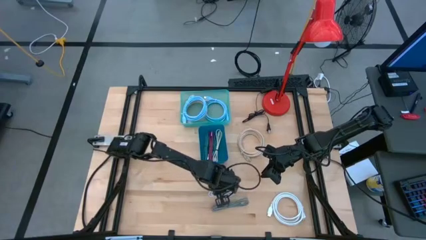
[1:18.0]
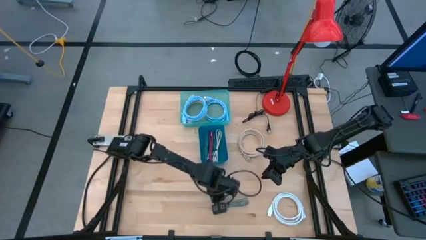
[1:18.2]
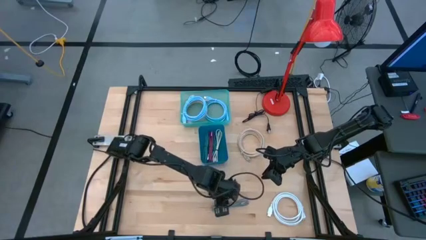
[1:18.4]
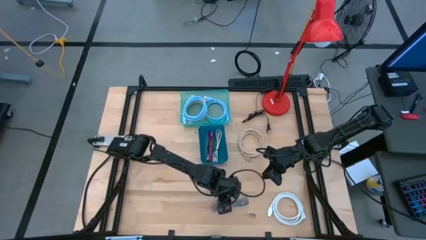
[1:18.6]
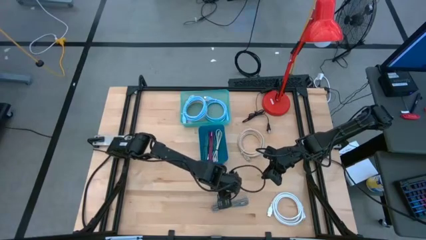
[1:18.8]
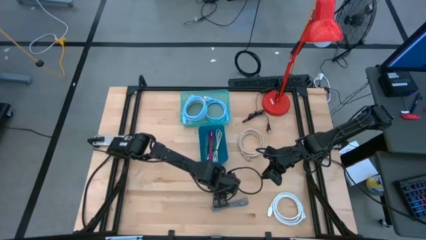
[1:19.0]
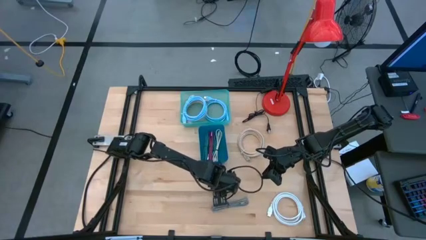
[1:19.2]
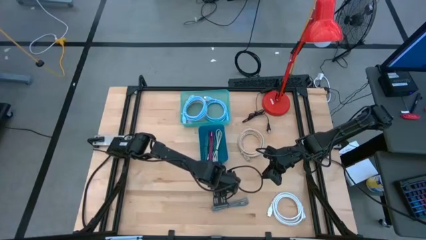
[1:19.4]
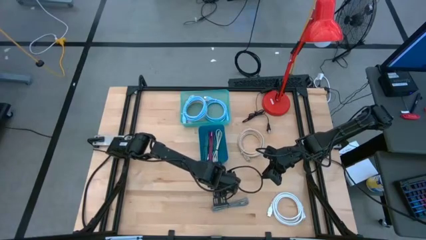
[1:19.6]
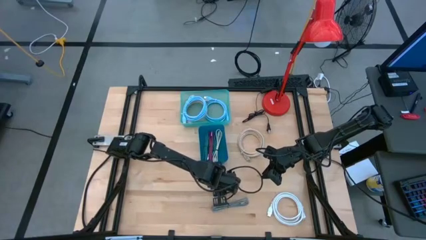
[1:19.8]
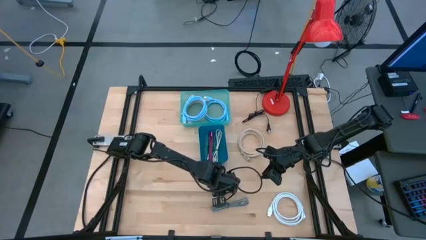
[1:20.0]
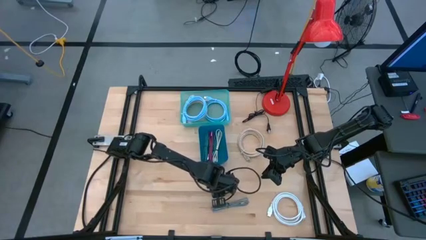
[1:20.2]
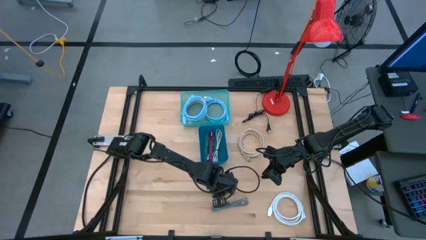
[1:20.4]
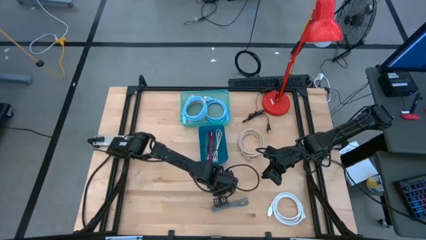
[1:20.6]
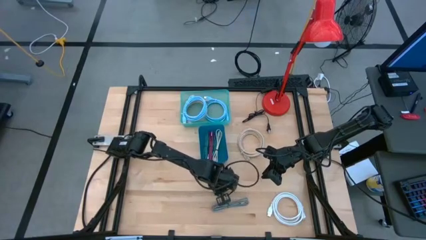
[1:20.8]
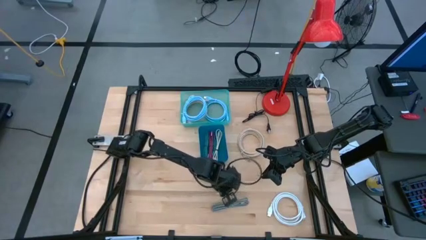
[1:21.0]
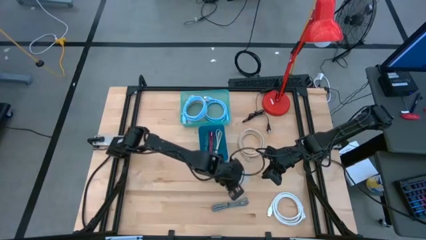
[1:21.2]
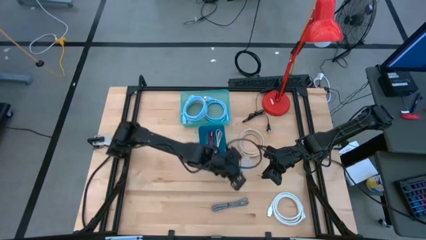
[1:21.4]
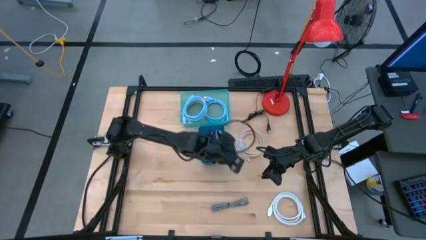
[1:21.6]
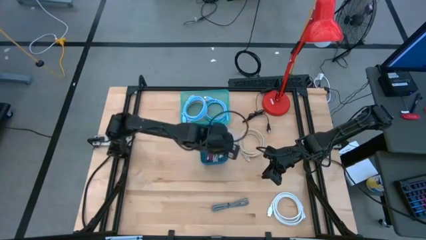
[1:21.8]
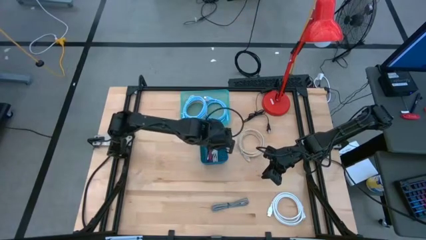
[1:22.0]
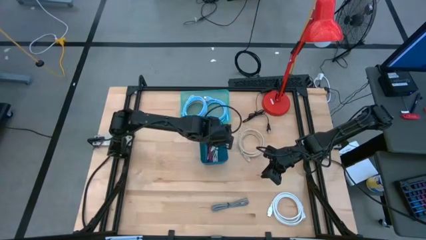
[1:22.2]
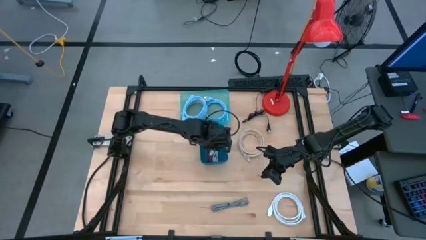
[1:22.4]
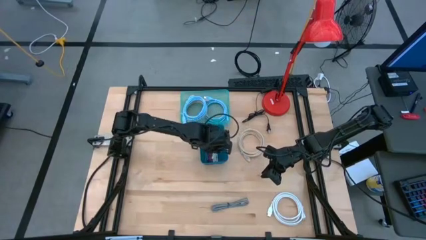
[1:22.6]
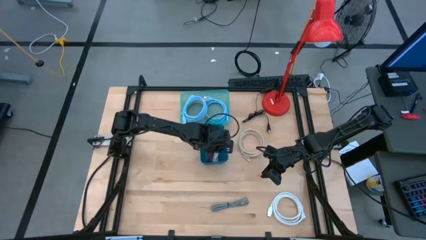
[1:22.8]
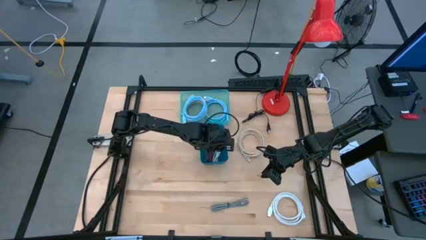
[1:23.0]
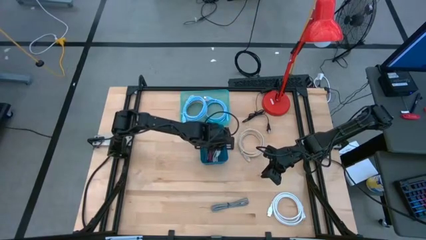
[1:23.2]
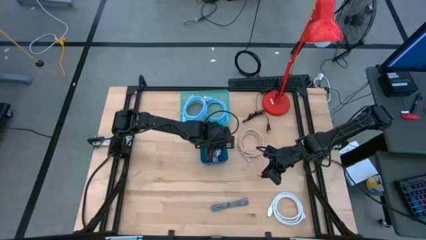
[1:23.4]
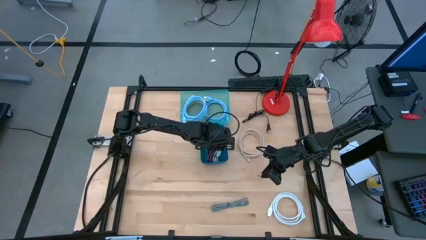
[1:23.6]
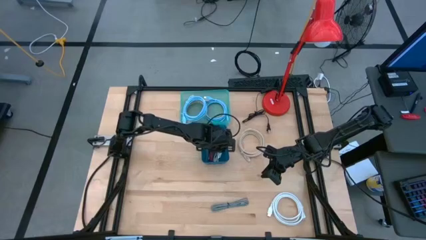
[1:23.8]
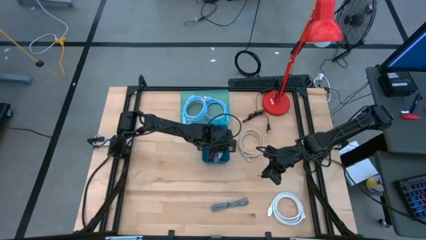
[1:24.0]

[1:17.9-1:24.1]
Task: Pick & Place USB Port
Put the white usb cable into the blue bin

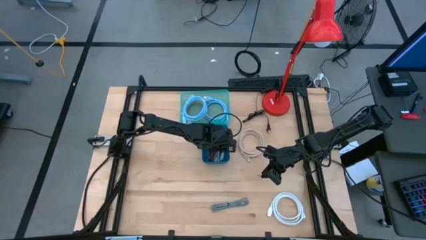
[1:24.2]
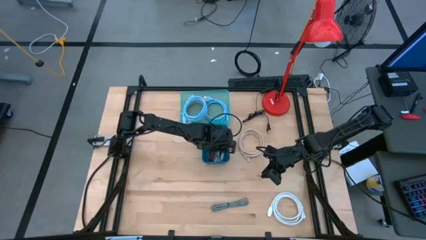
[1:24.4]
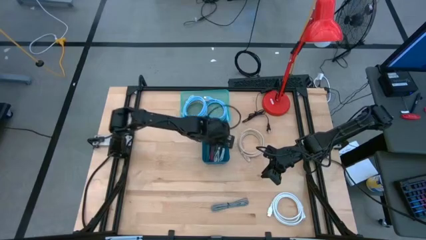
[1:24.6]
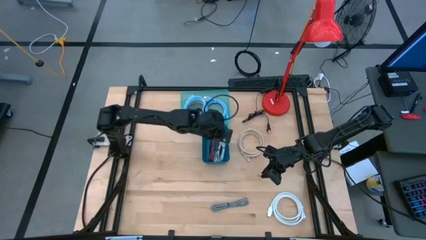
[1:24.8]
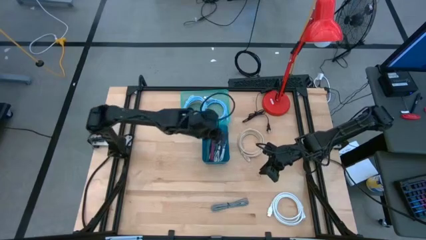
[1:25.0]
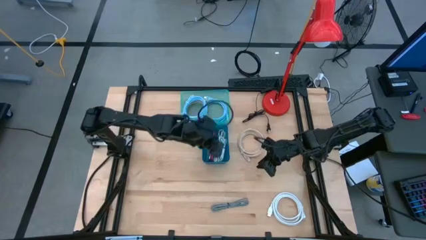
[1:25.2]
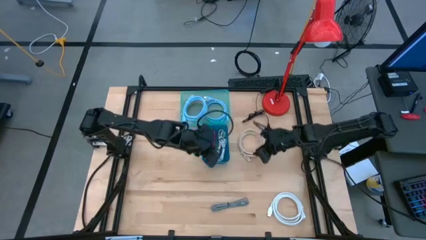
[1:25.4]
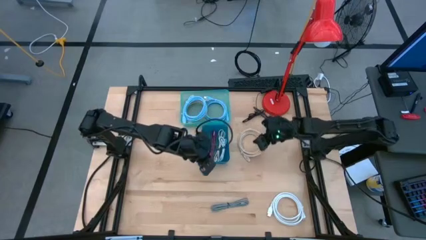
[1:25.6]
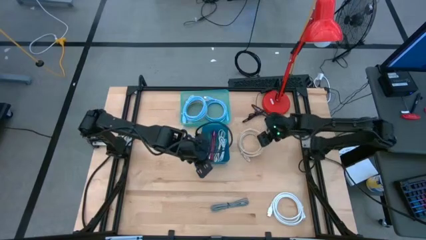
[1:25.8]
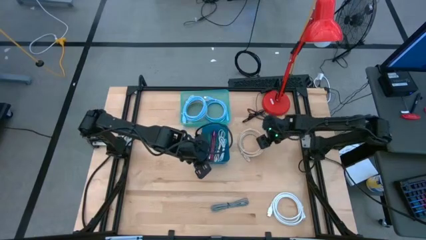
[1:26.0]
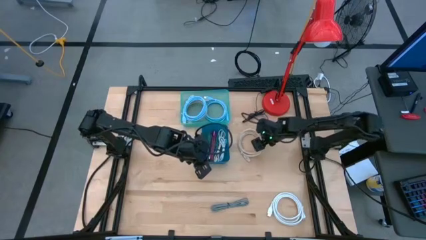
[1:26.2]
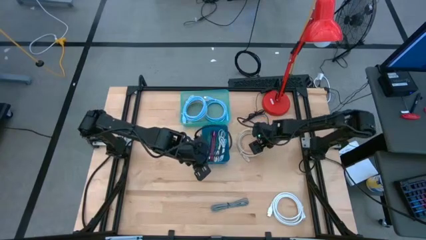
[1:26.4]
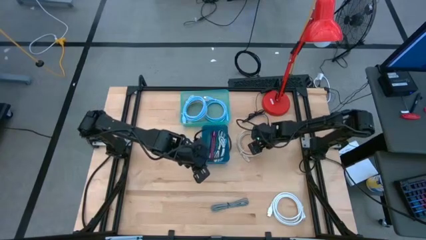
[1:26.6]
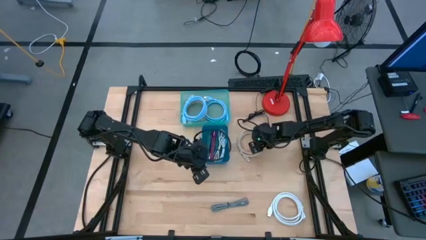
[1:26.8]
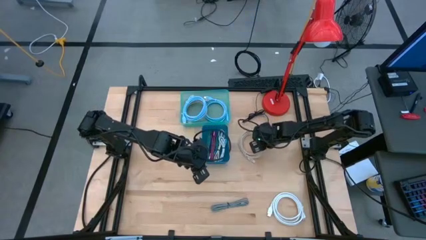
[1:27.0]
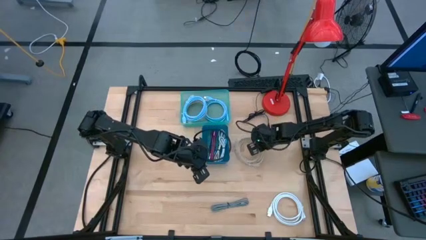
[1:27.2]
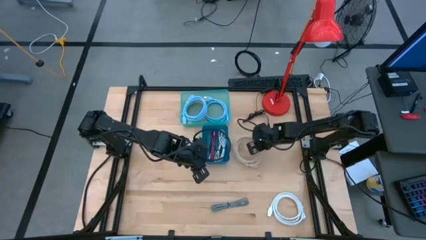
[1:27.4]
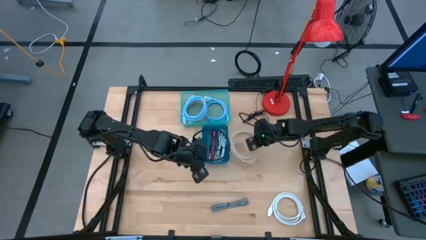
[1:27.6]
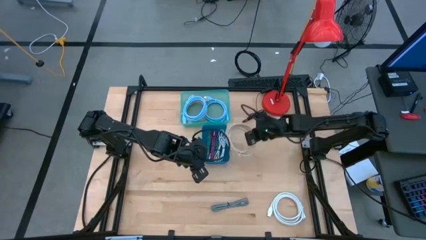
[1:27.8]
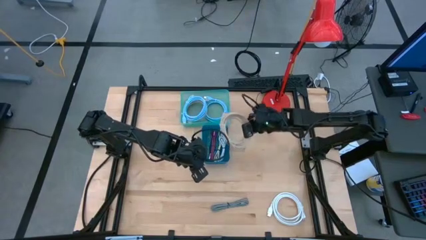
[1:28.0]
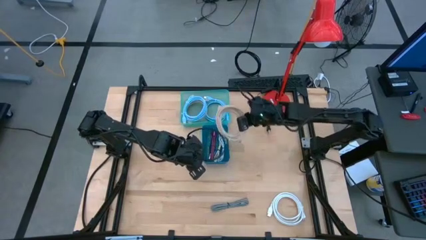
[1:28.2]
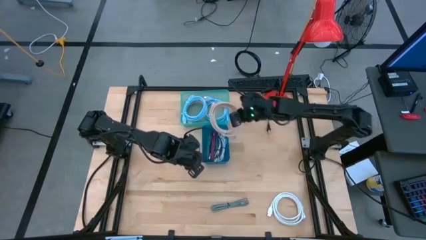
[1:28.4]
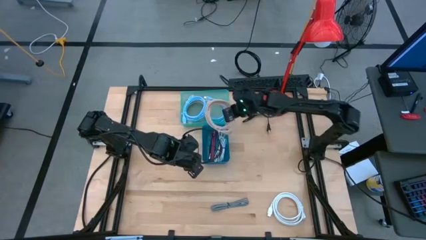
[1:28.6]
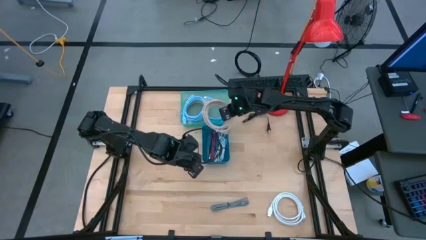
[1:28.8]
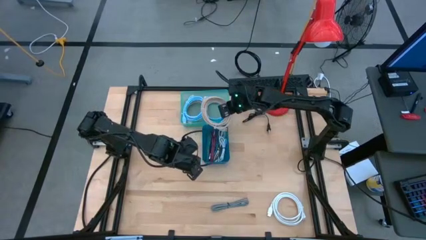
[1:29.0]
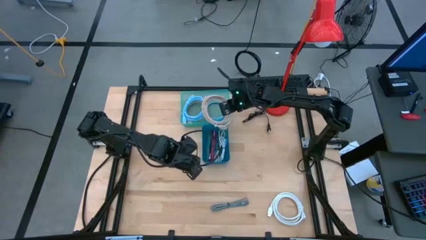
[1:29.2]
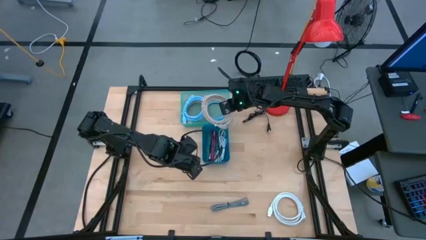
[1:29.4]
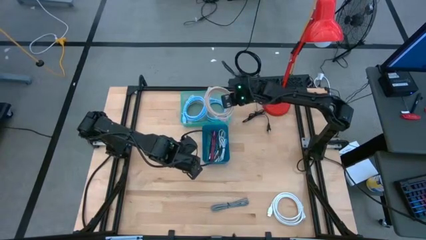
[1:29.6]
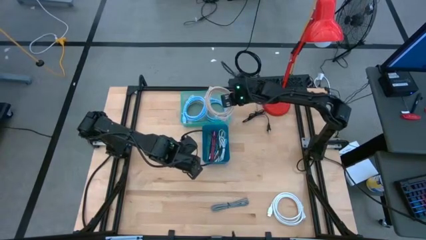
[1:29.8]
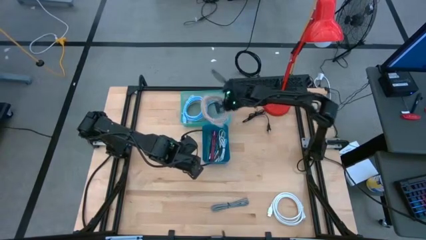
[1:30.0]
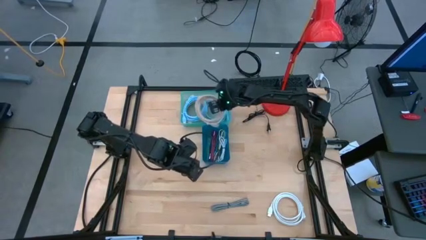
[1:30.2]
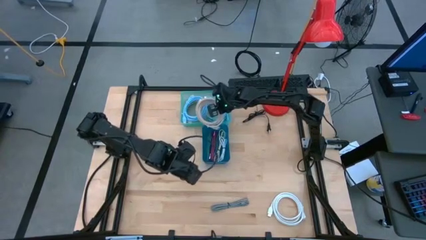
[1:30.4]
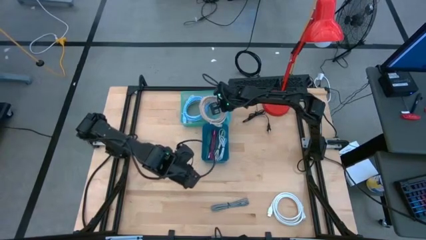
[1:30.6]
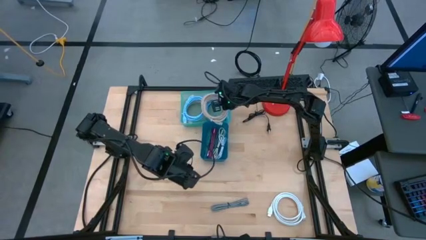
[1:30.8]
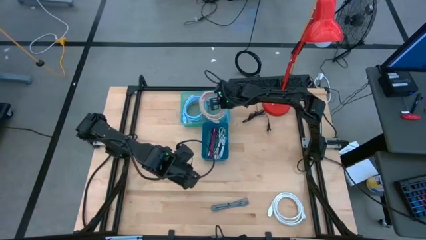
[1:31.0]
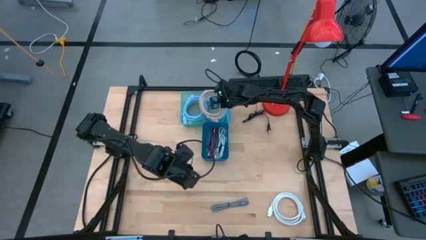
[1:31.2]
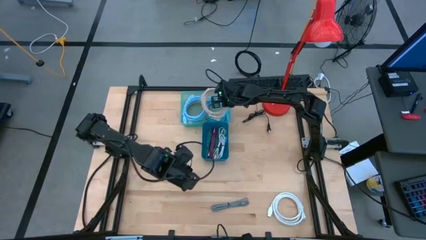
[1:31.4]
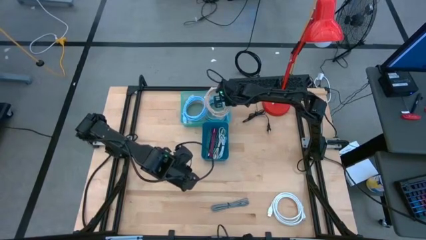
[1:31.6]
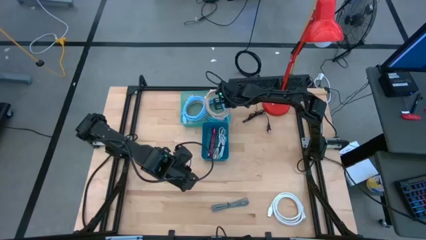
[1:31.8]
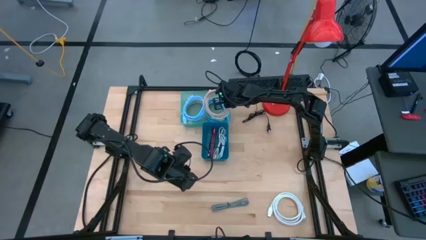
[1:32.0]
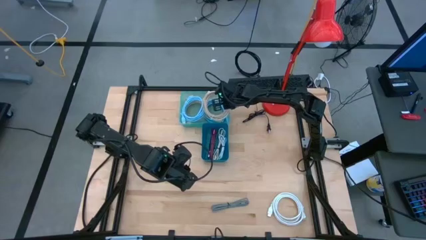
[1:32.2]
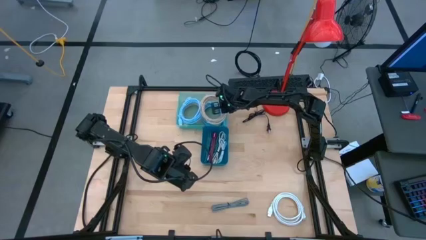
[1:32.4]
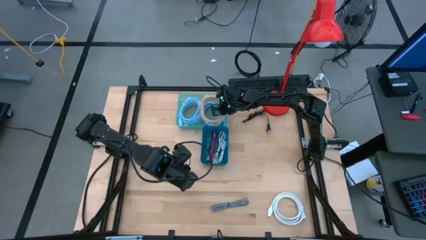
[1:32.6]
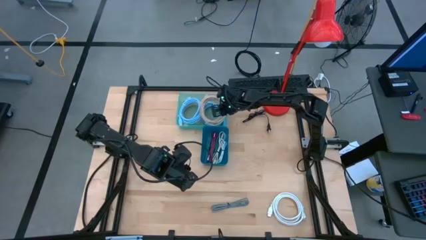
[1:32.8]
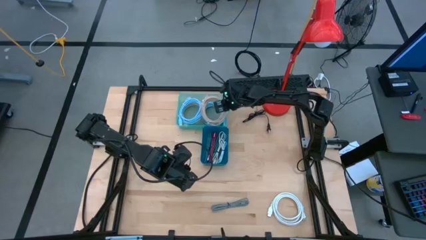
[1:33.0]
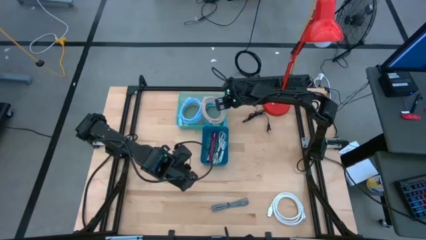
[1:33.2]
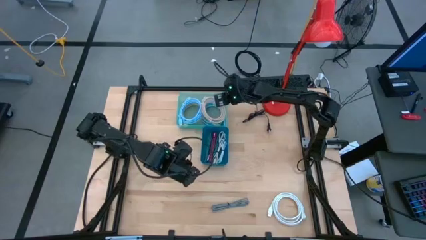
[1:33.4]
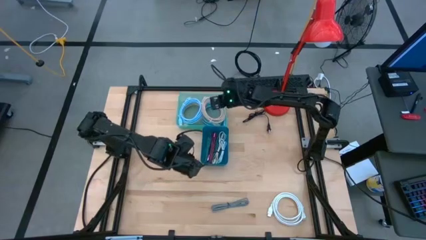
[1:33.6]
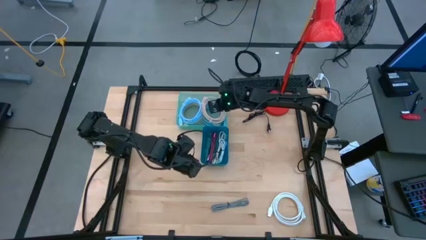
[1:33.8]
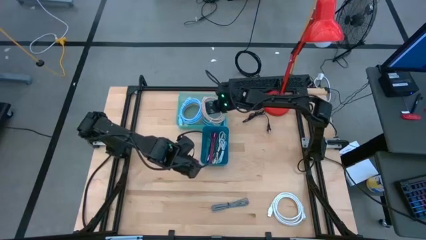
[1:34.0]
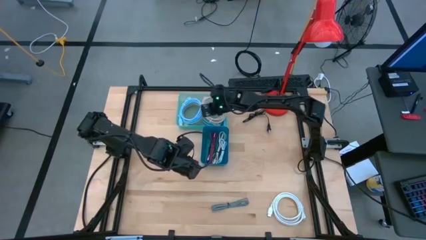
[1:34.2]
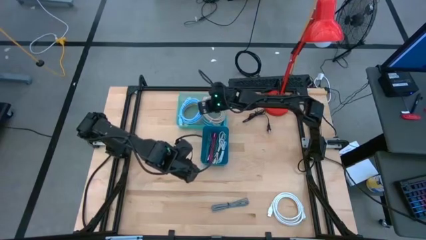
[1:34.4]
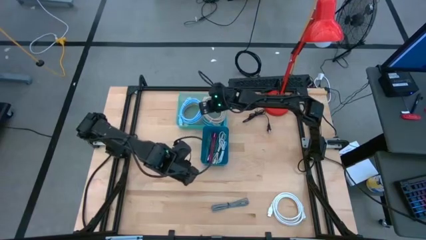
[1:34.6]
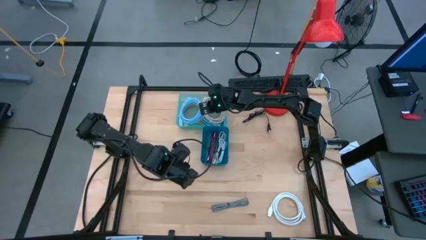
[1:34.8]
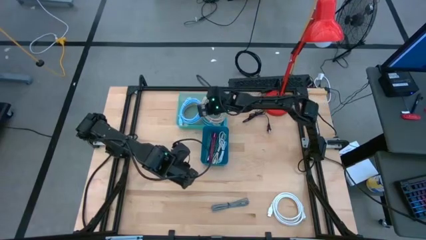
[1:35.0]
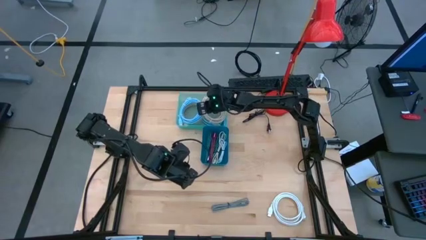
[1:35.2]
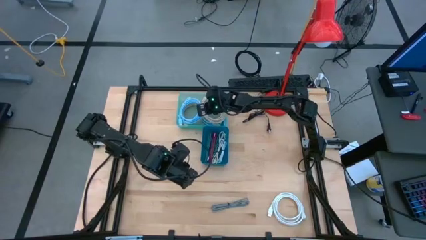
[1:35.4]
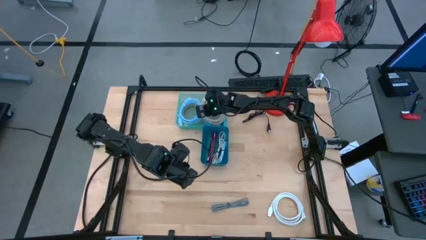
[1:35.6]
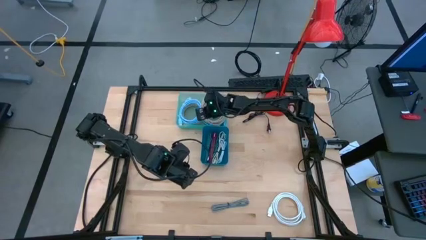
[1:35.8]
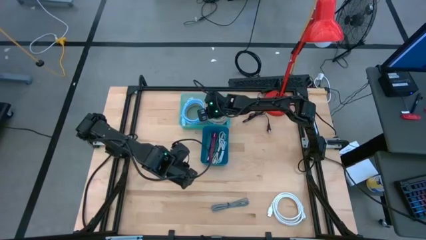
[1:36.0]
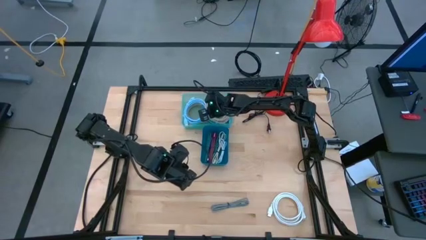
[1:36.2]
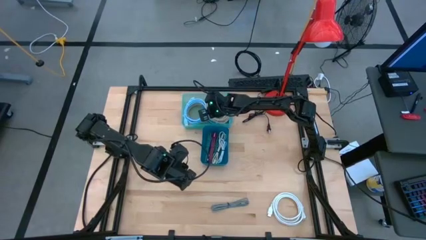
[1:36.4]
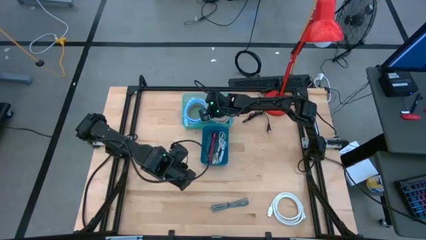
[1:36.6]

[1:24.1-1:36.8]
Put the brown hdmi cable into the green bin
